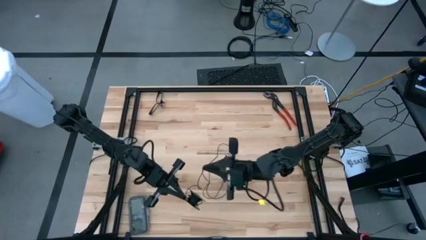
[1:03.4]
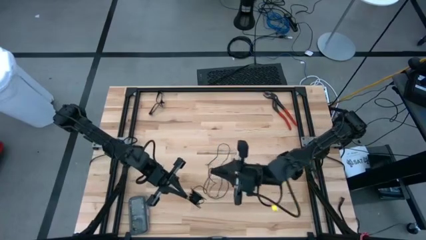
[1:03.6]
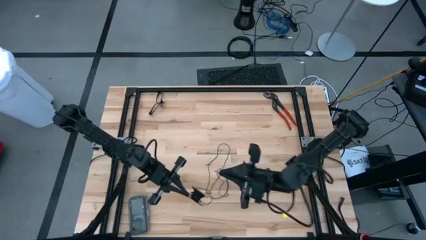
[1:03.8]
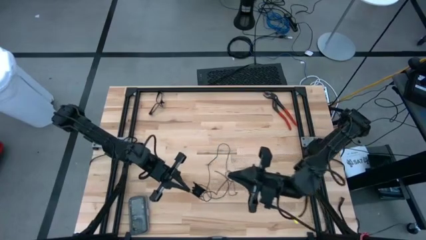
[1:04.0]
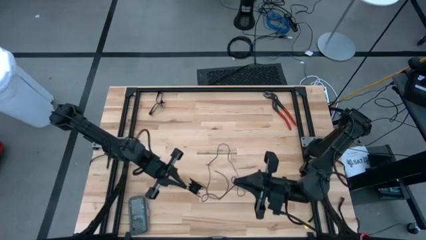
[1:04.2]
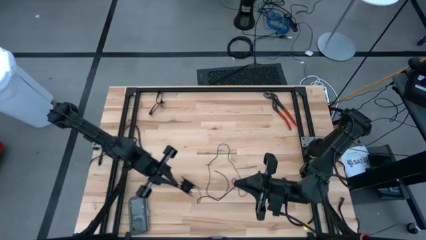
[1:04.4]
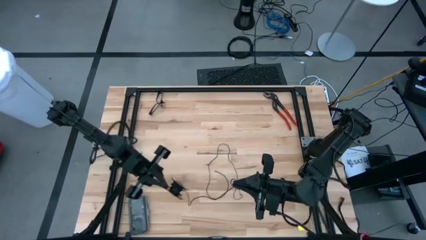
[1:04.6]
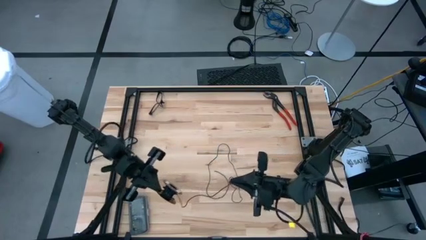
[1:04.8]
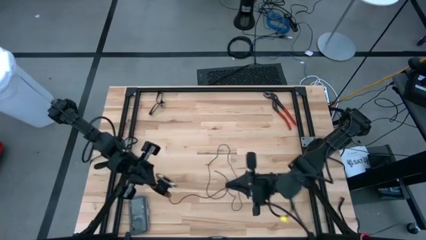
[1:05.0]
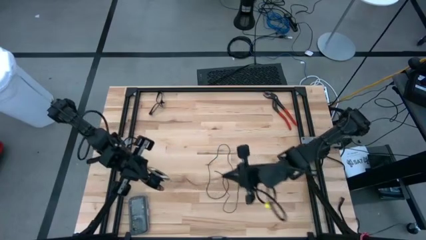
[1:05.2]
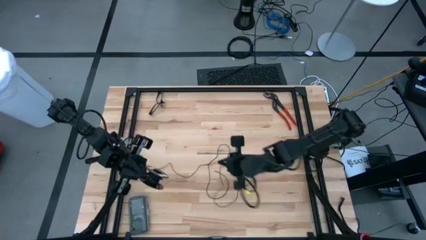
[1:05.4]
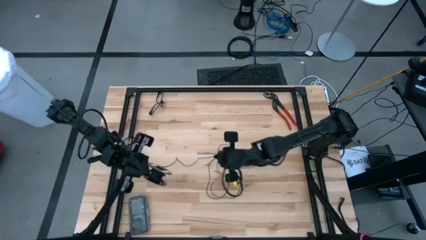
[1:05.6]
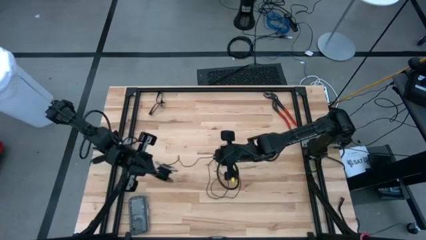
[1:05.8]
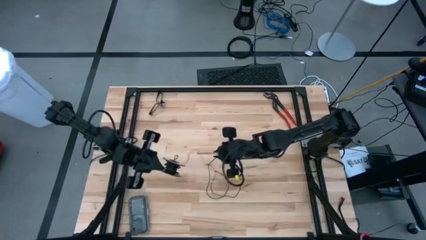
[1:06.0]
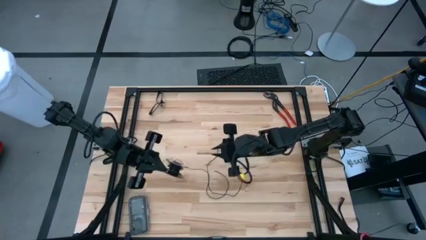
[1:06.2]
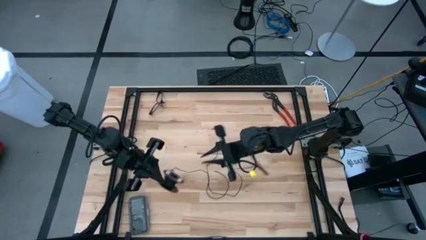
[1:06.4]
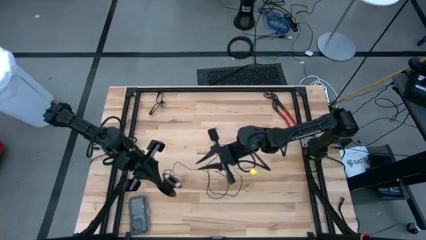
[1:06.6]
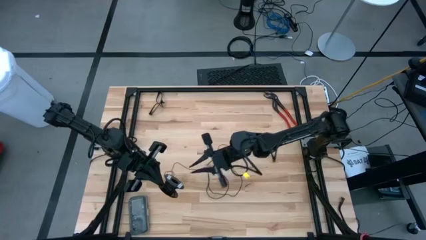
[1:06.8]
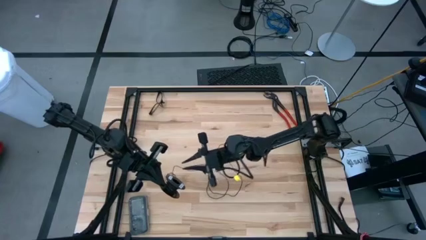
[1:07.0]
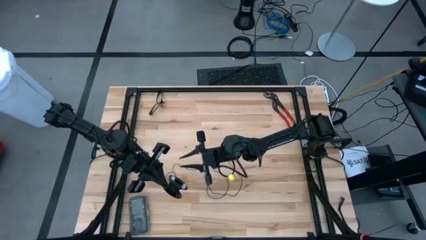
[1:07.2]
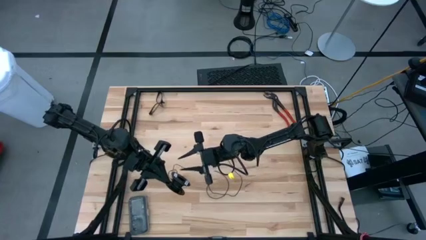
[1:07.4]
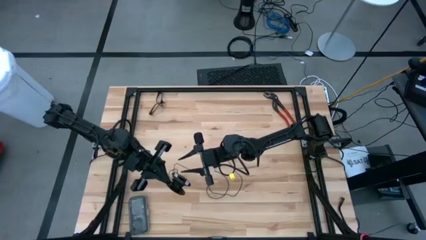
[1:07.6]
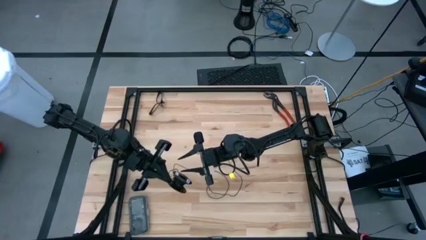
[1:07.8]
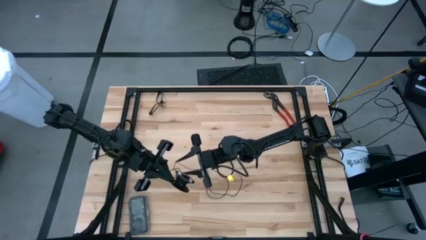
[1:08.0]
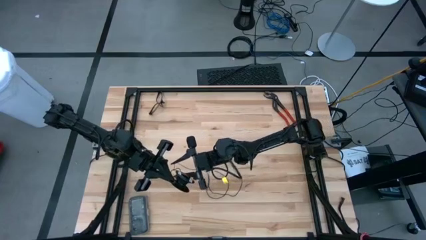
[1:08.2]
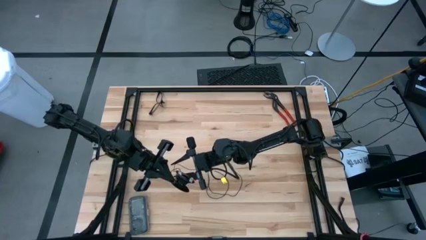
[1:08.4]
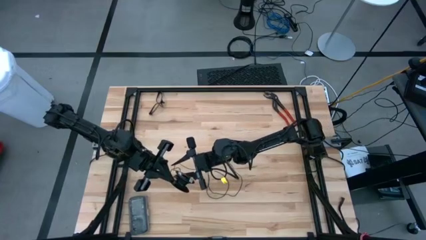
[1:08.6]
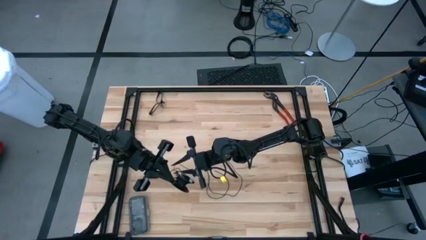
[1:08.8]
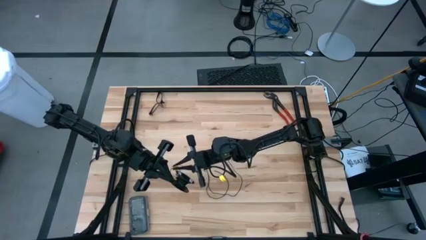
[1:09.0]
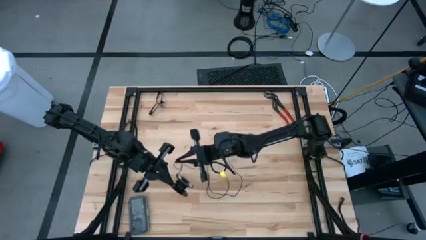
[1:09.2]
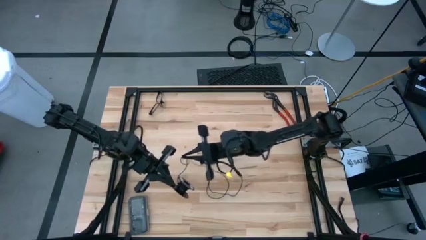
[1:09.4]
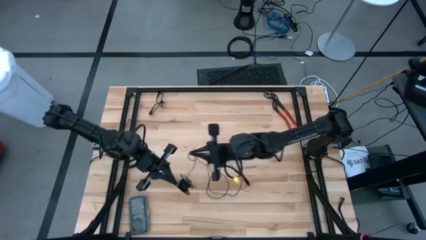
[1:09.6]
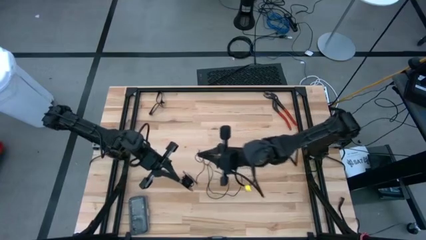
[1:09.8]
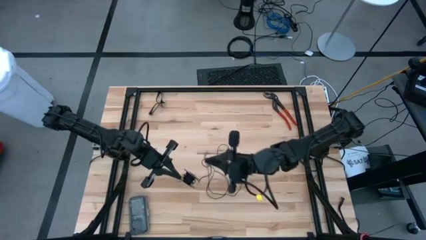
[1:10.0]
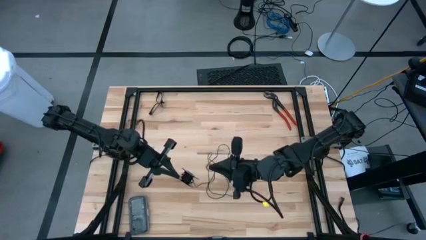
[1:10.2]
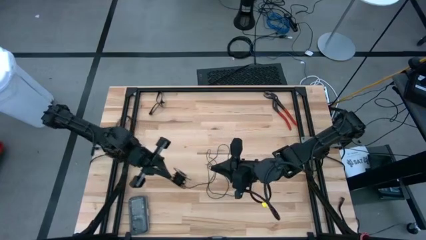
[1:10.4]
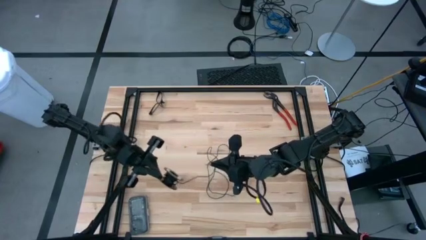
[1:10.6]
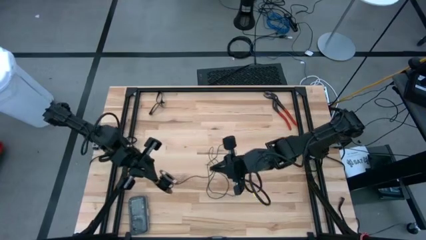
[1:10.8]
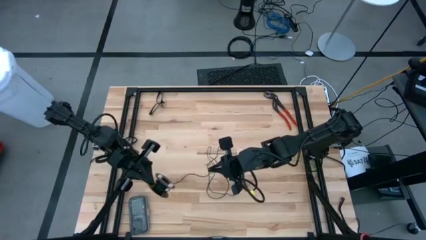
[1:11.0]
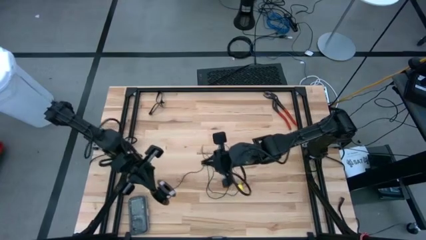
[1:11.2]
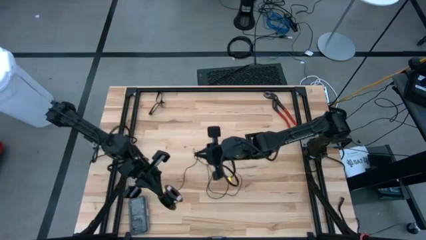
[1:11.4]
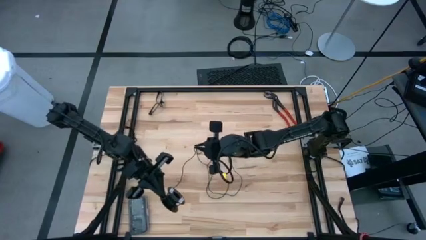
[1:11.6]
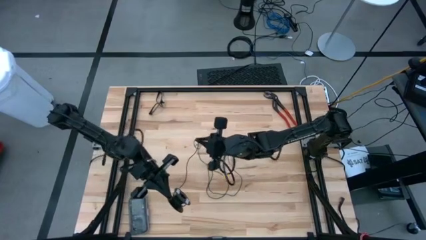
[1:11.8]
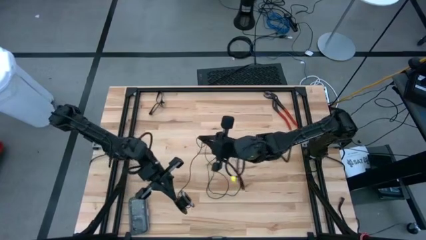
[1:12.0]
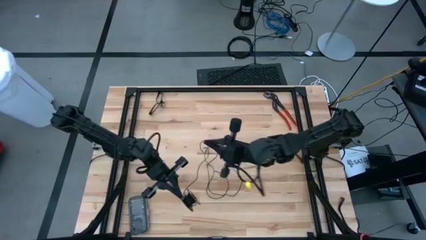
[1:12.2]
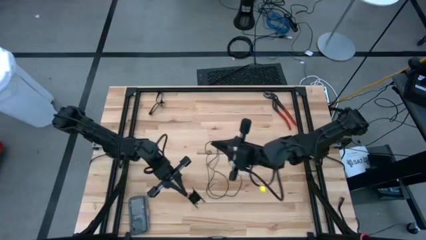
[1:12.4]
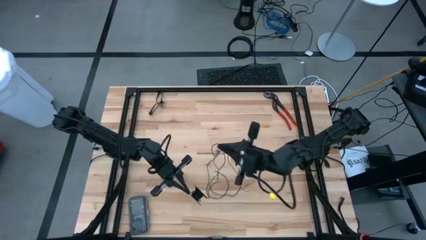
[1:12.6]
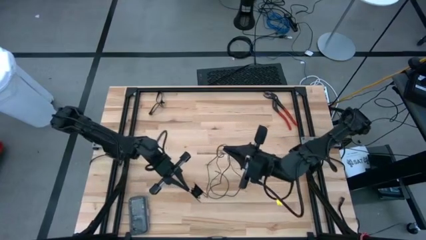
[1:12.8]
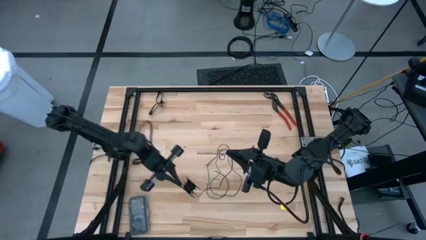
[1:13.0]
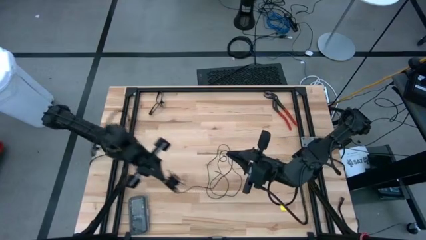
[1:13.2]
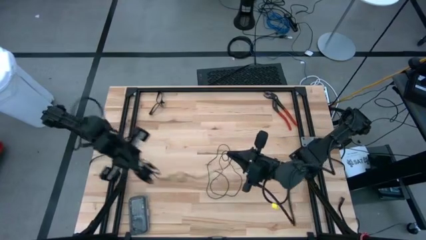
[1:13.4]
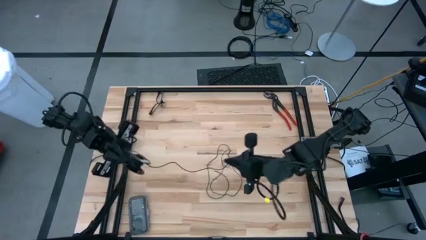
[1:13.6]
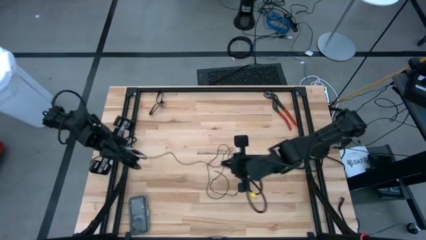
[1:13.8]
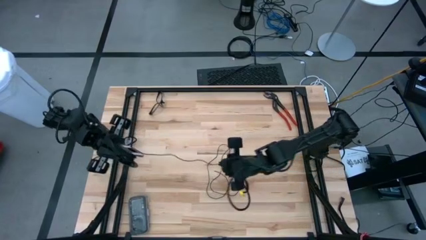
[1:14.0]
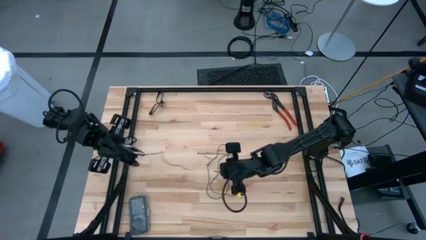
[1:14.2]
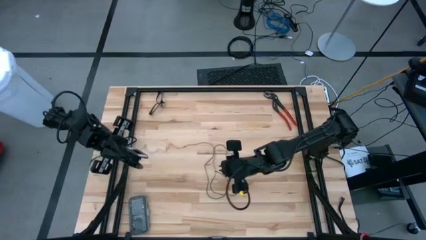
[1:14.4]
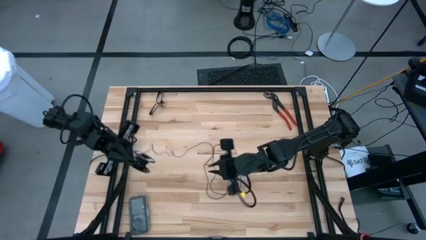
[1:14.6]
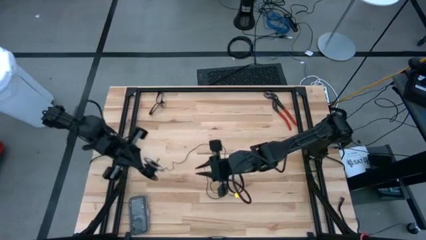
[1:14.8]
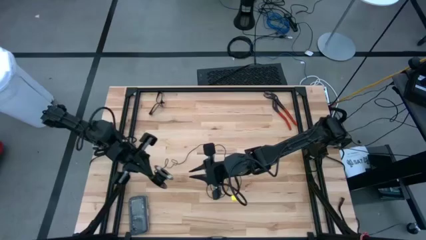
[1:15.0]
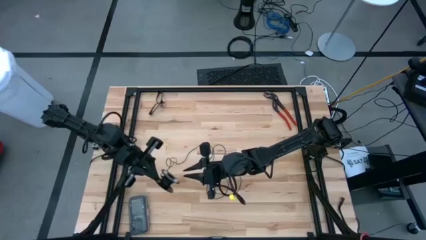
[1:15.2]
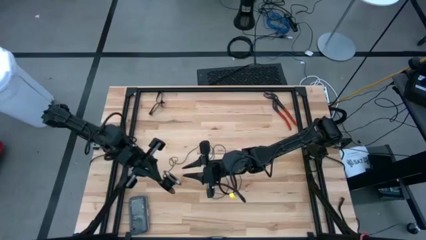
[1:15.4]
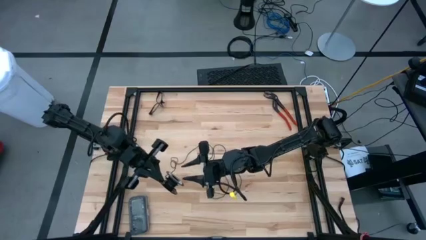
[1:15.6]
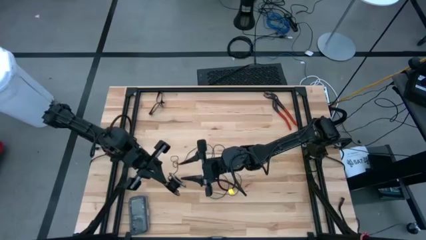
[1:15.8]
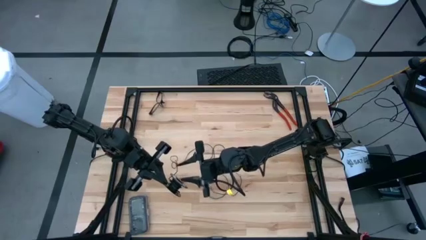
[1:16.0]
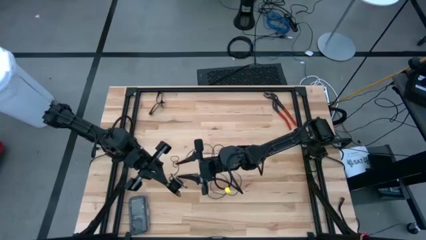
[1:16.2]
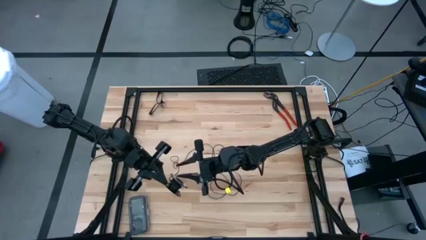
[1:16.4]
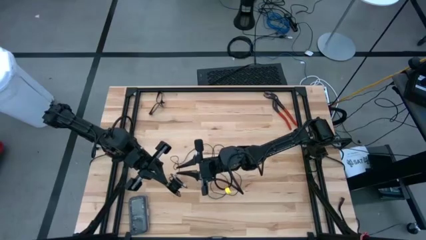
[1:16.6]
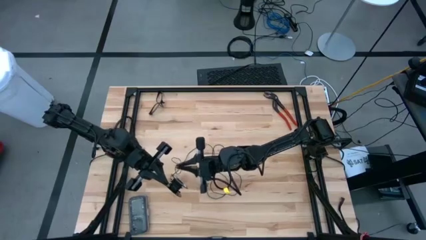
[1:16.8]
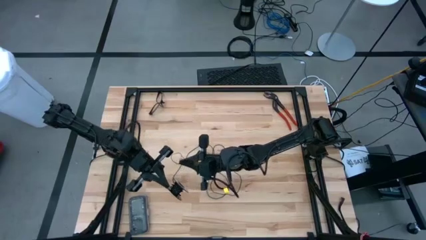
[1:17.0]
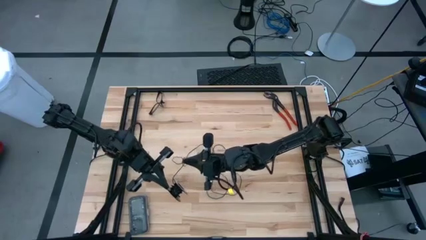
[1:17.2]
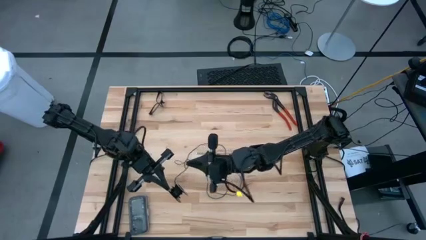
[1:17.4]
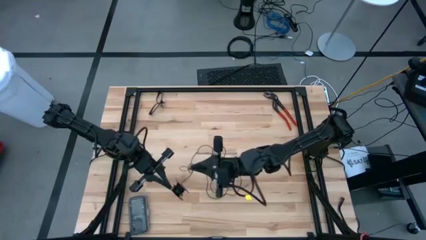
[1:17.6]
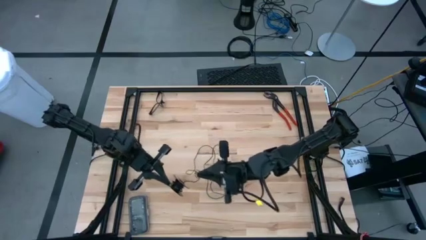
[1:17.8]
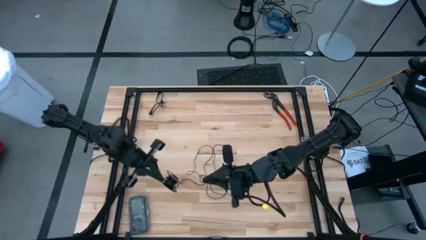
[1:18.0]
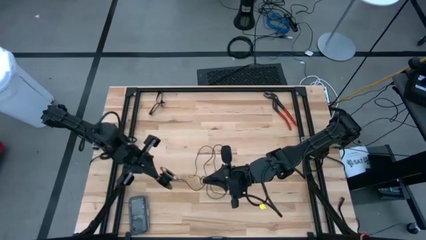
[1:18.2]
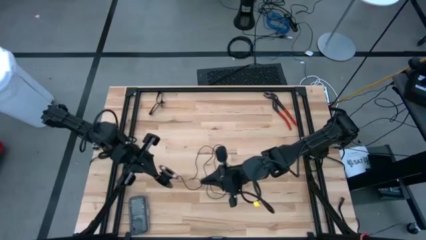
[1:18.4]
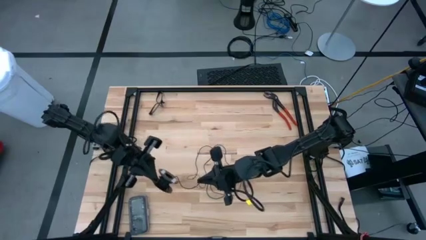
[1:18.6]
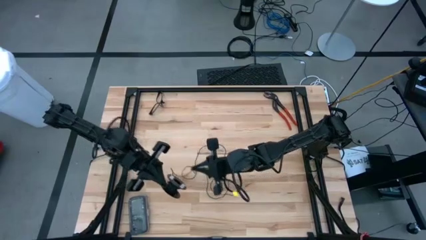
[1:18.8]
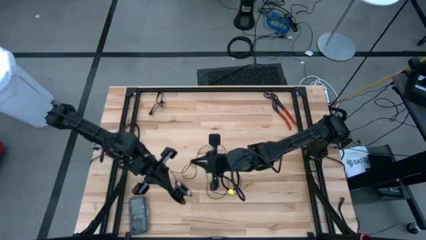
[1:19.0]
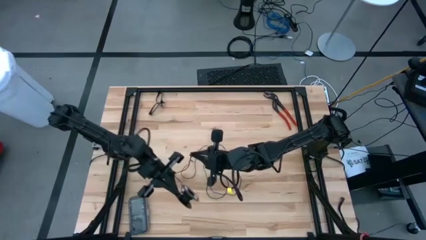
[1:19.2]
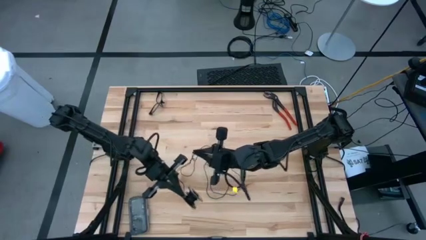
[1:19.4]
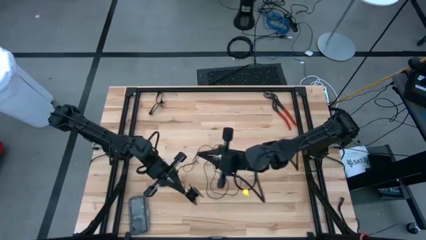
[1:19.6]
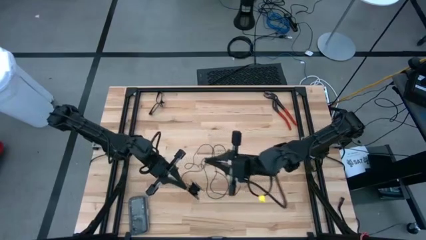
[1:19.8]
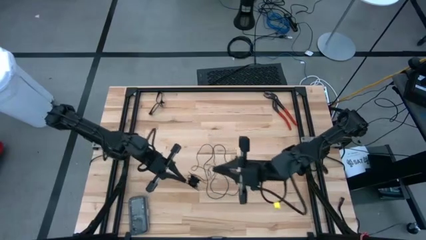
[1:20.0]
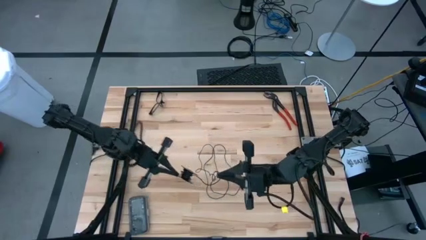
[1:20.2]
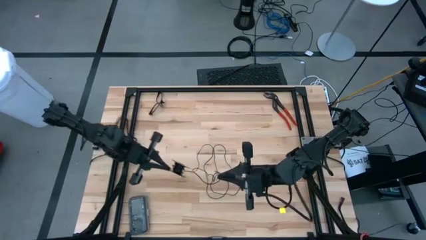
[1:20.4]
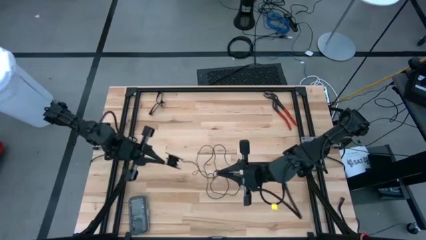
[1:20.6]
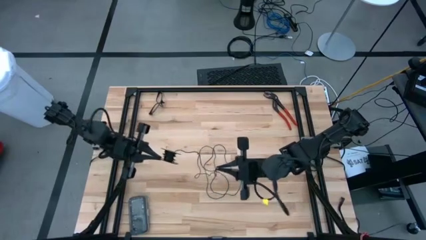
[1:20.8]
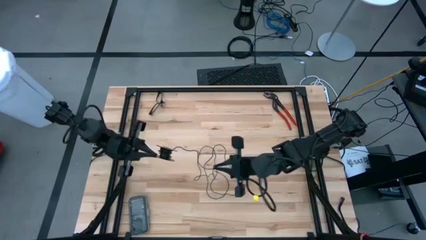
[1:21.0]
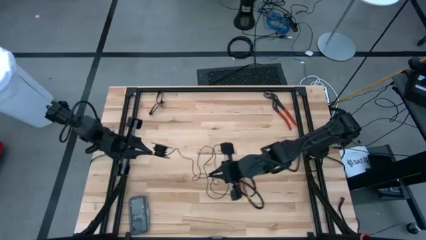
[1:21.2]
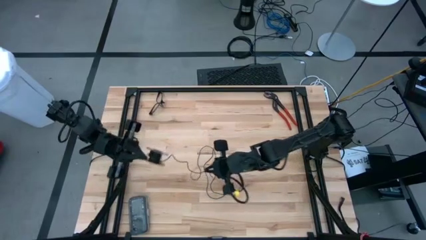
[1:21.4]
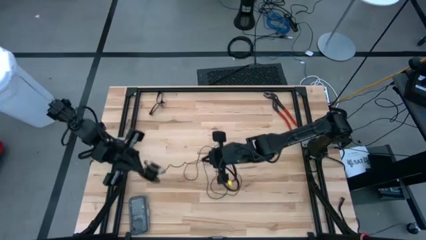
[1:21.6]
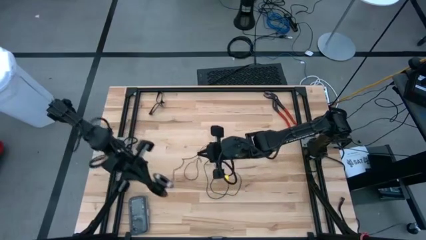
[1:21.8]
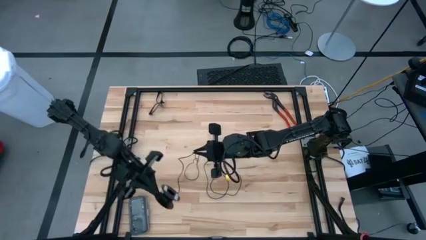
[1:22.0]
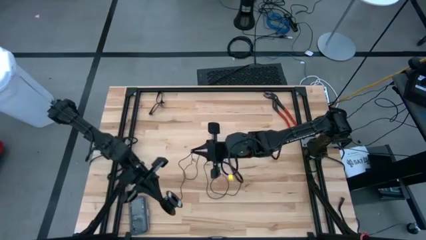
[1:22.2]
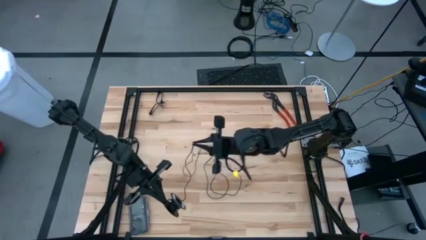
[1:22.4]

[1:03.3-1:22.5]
Task: Coil cords
Uncoil the black cable wire from the spool
